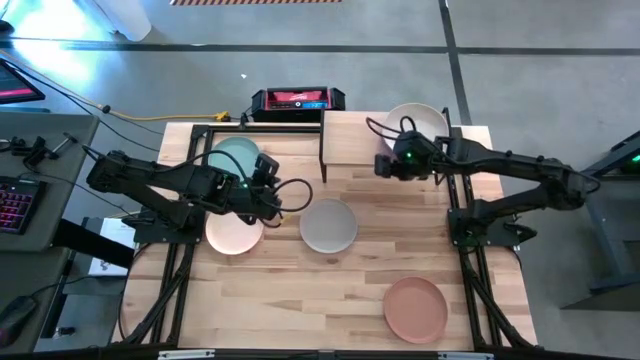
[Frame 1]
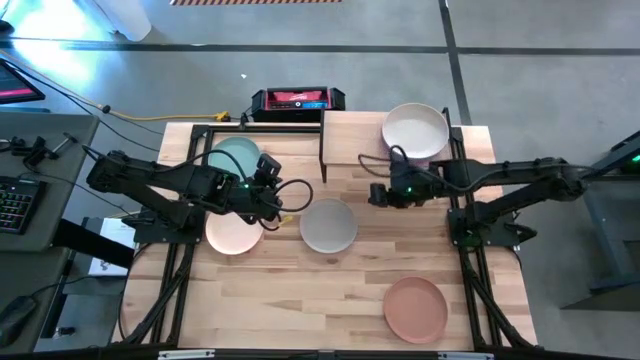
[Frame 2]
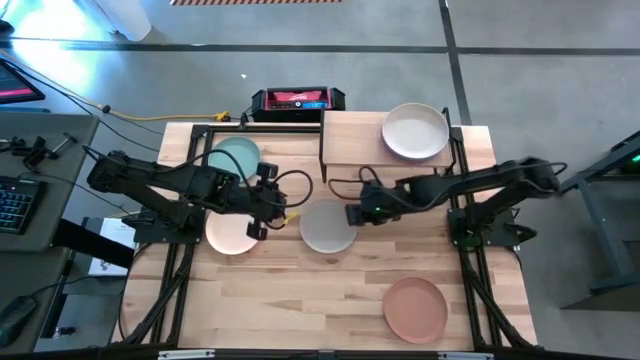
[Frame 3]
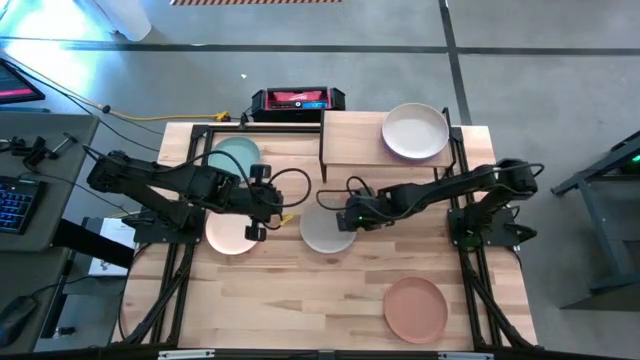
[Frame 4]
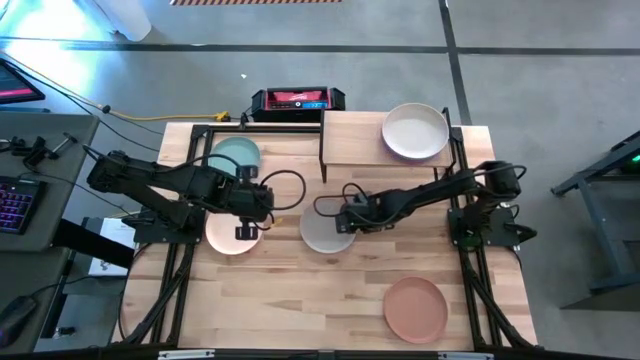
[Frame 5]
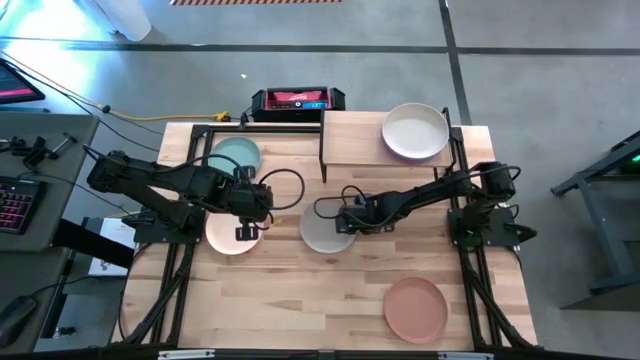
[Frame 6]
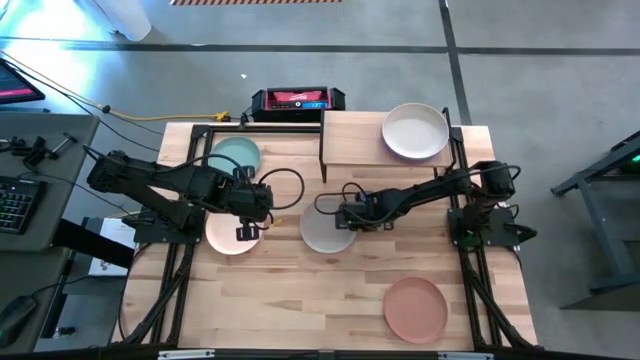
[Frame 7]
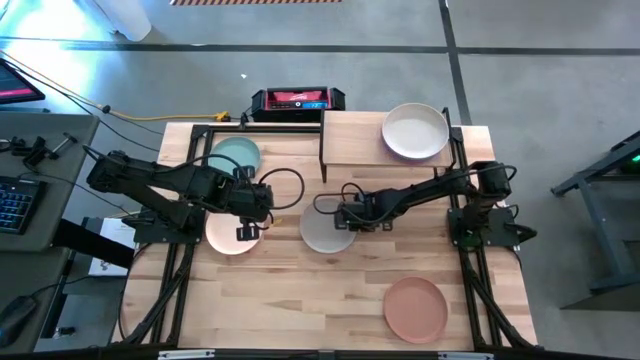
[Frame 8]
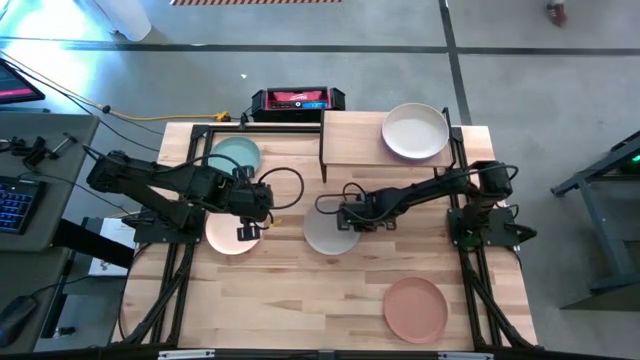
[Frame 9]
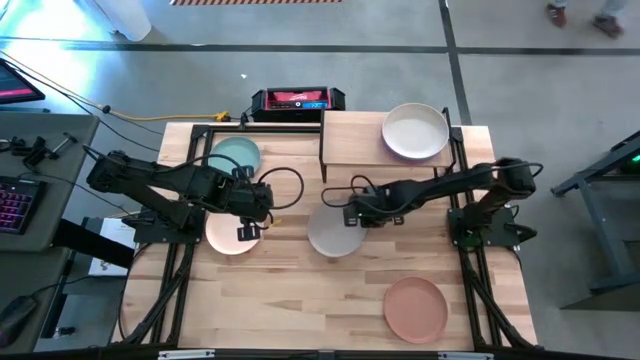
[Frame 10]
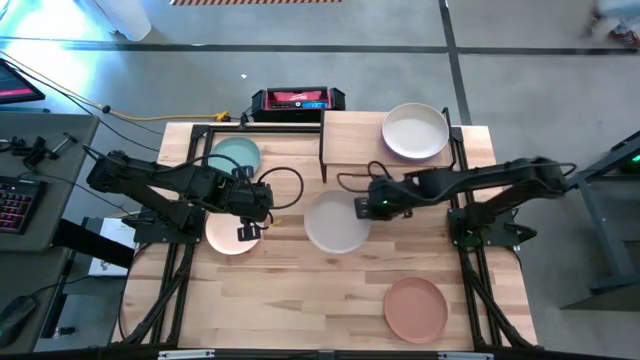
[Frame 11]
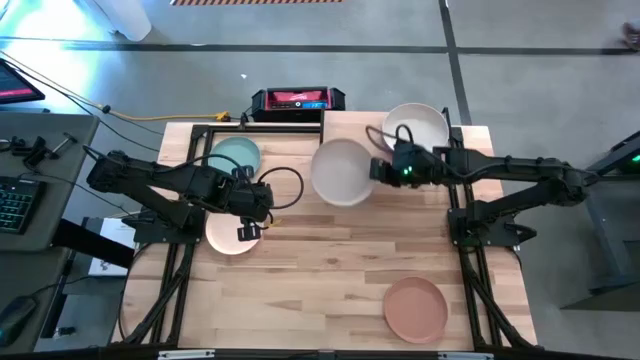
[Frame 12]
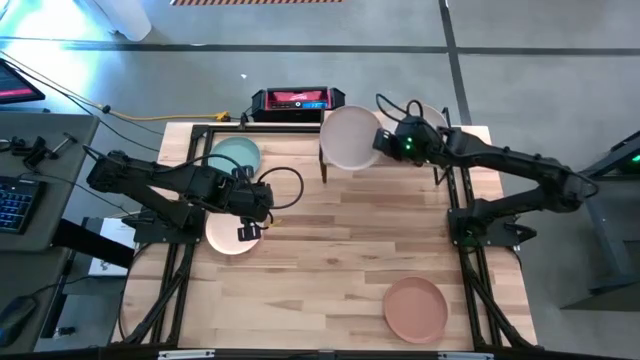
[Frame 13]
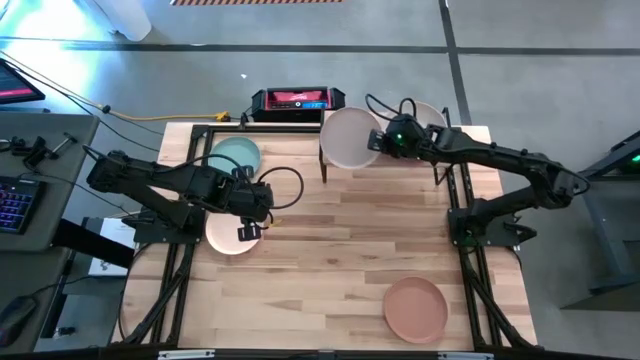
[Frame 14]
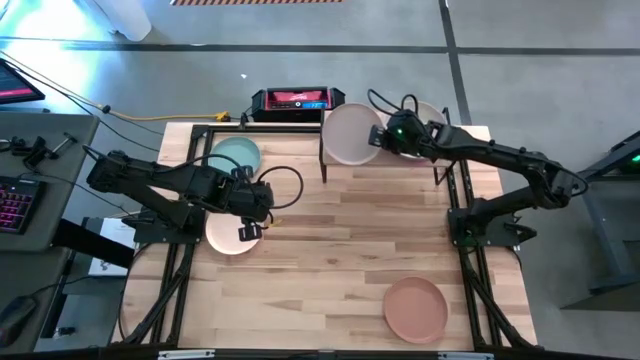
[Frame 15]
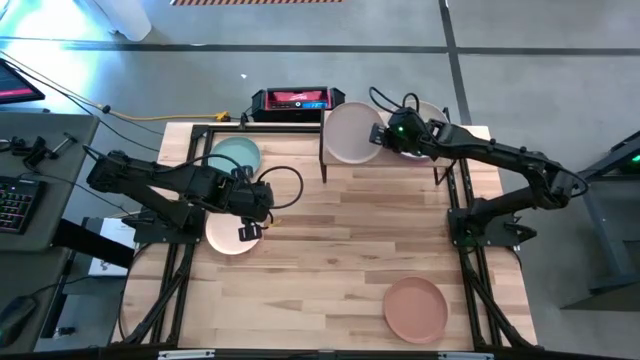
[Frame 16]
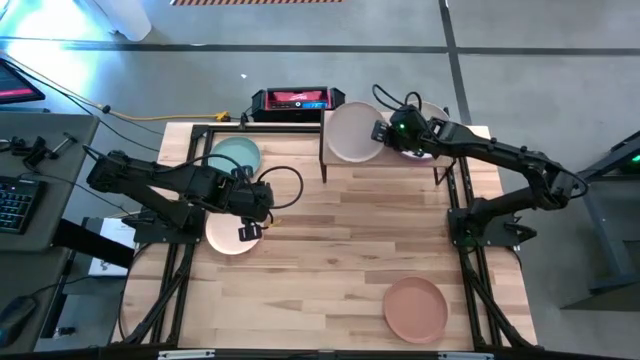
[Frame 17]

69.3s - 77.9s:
Task: Place and stack plates onto a shelf
Put the gray plate on the shelf

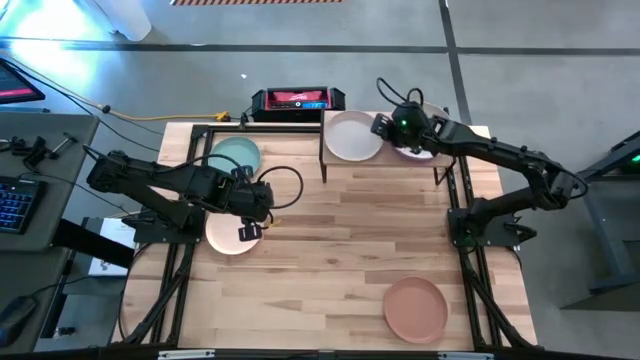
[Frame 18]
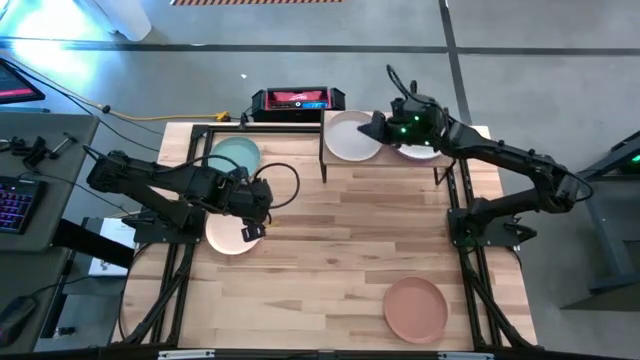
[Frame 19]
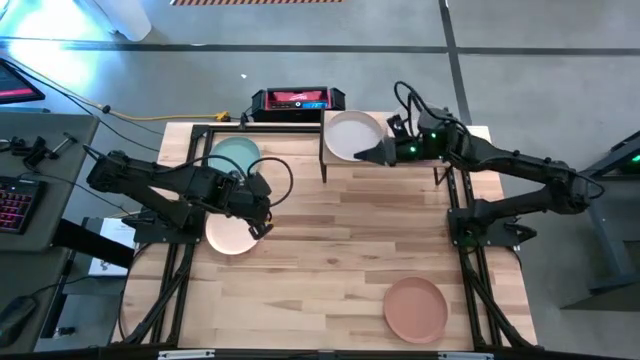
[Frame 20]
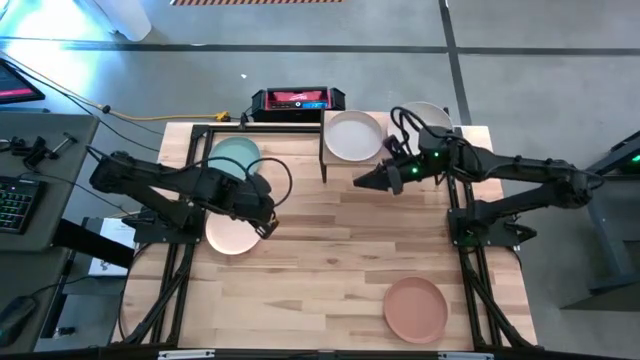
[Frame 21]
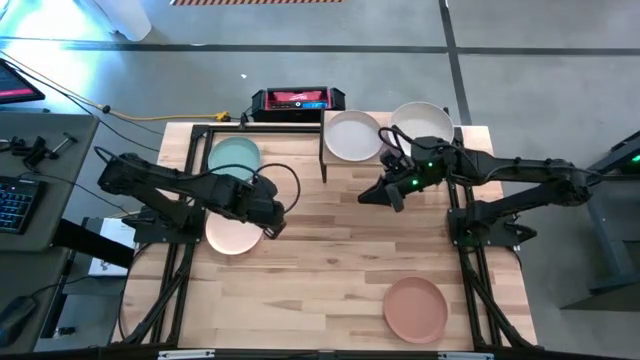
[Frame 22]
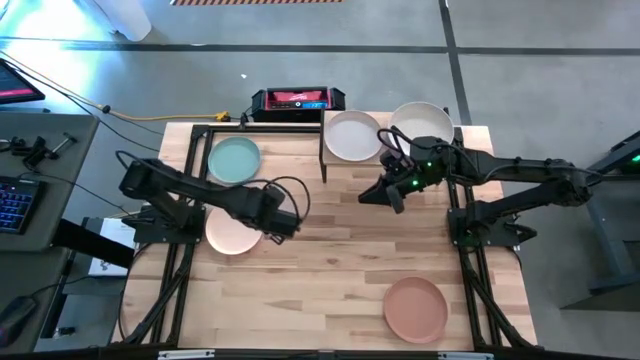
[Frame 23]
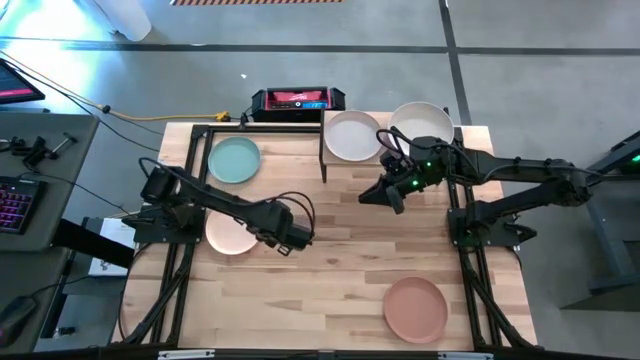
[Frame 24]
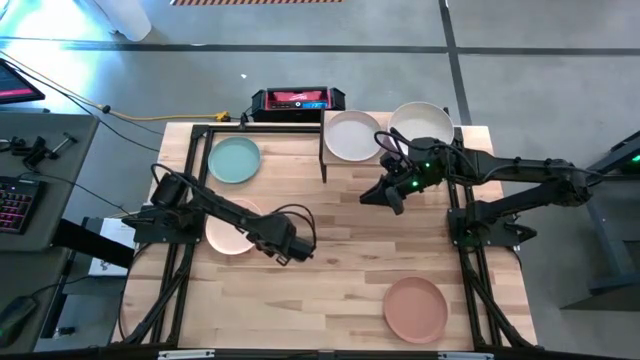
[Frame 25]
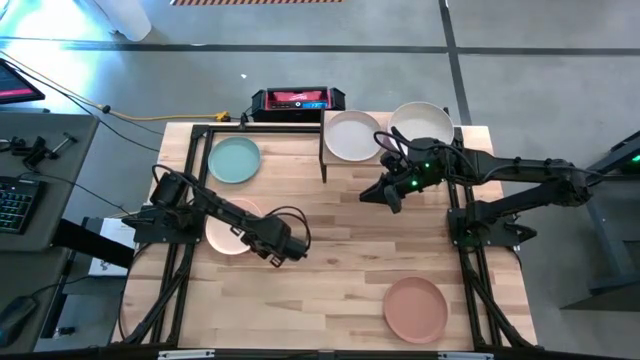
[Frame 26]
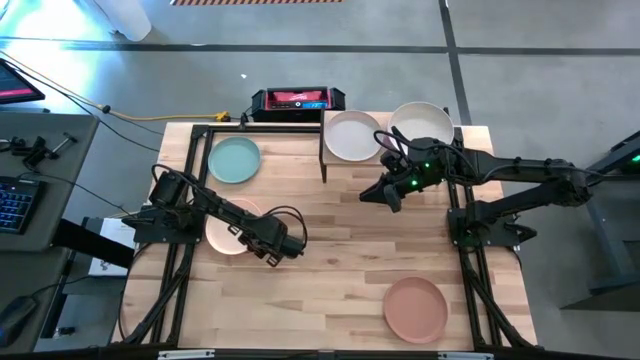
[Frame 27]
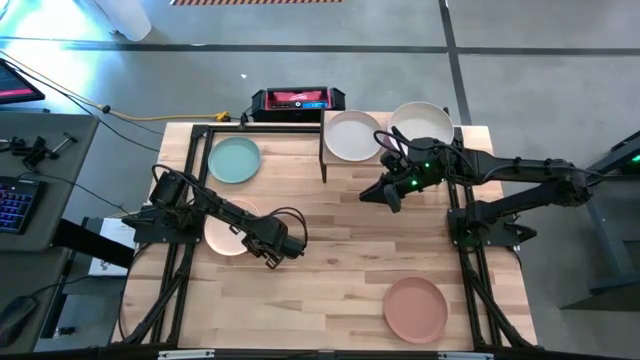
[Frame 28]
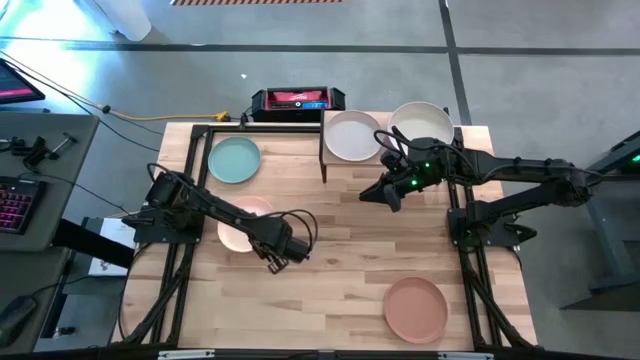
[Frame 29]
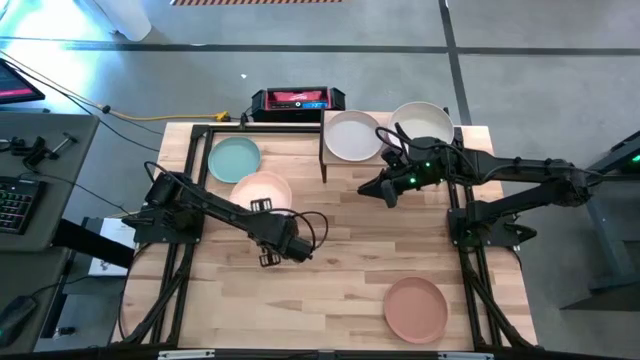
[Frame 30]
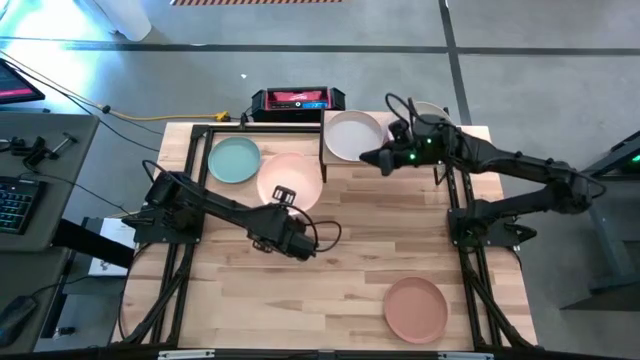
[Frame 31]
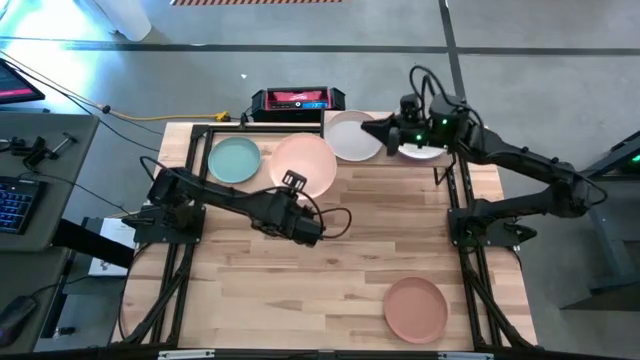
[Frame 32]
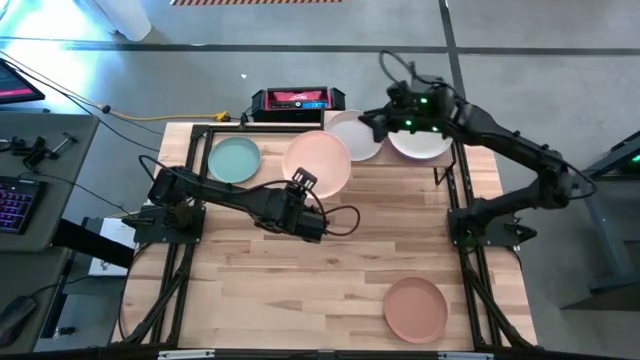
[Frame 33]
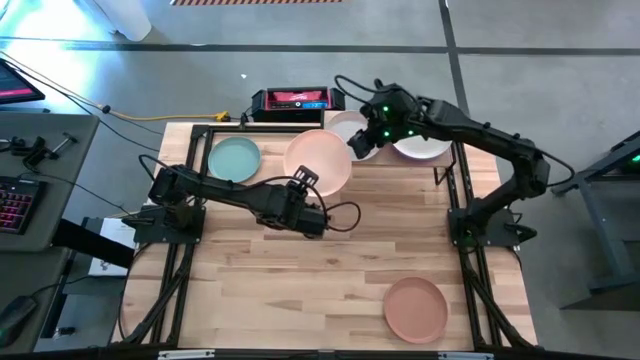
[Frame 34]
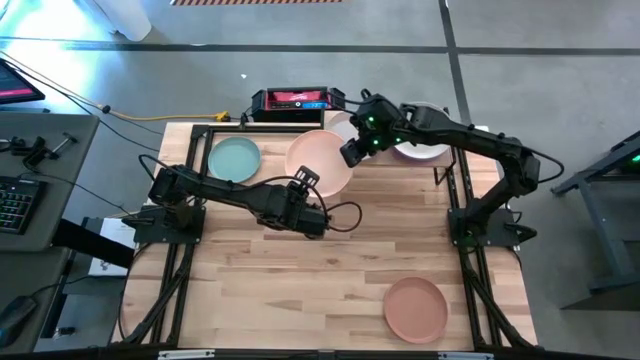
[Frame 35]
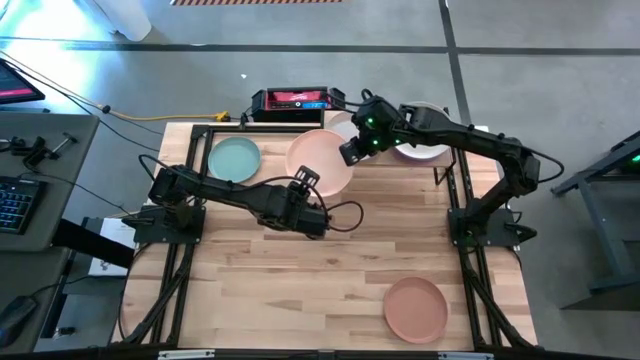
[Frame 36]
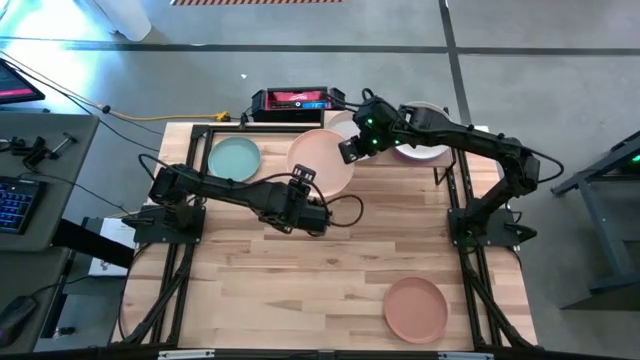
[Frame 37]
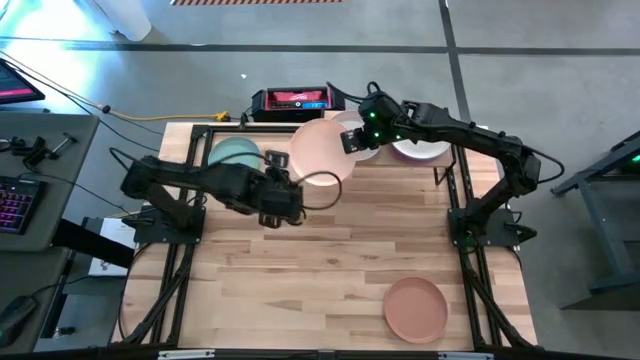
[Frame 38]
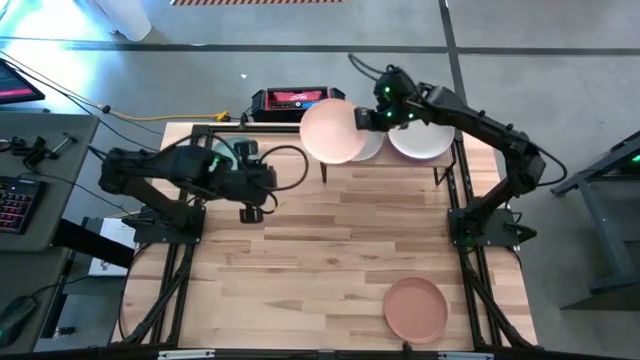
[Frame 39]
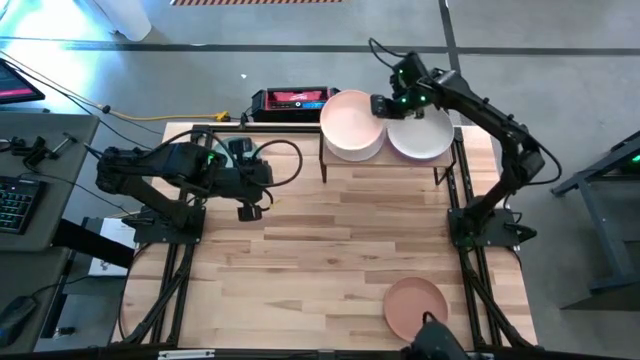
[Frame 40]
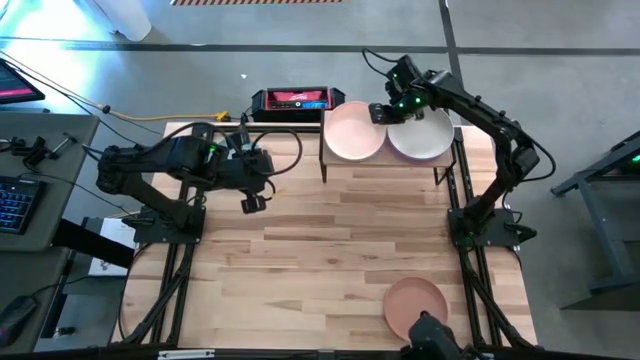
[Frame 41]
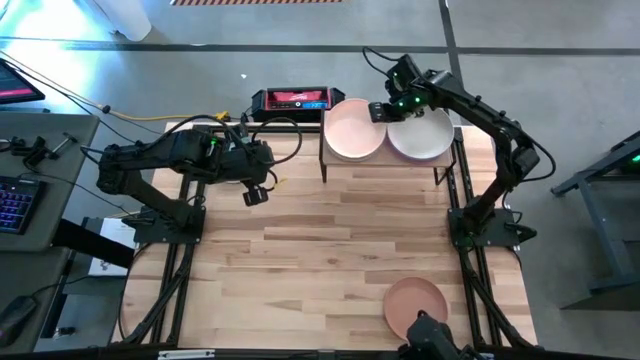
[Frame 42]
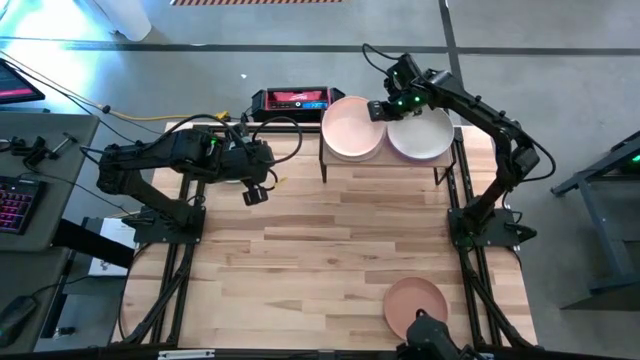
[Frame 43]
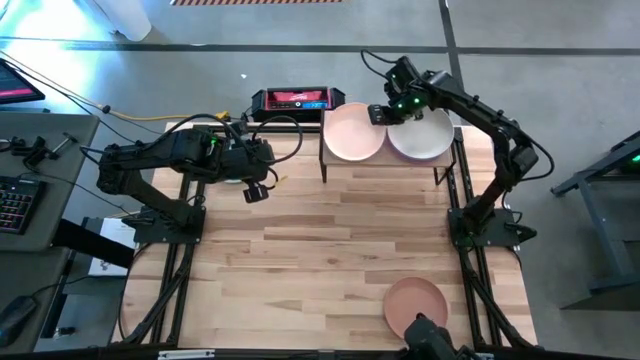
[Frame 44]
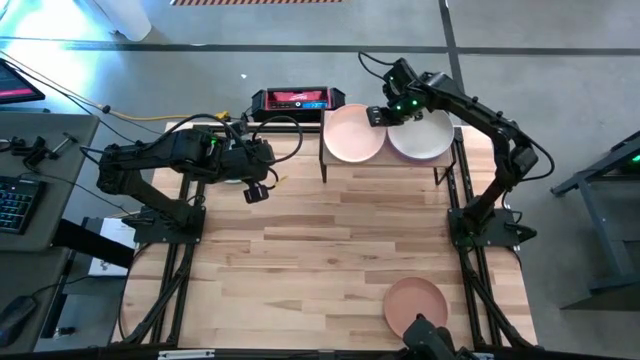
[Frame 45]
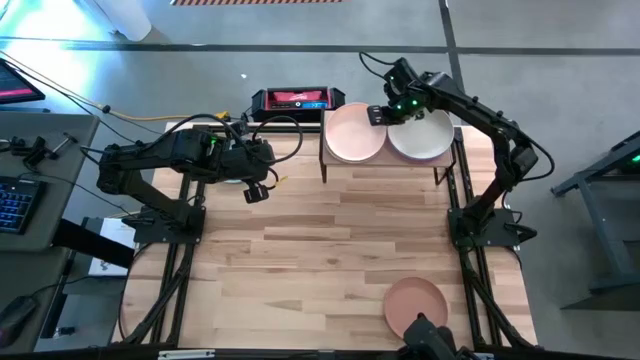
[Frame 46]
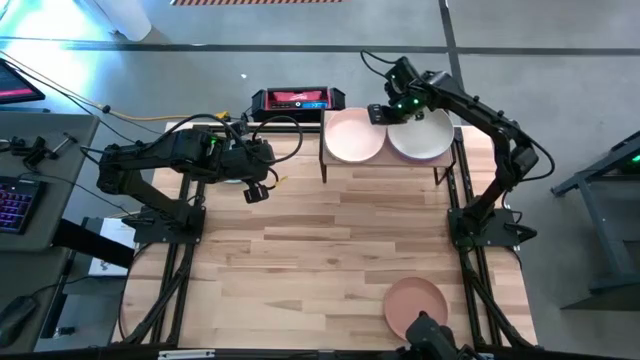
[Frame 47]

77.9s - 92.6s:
Stack the white plate on top of the gray plate on the shelf
